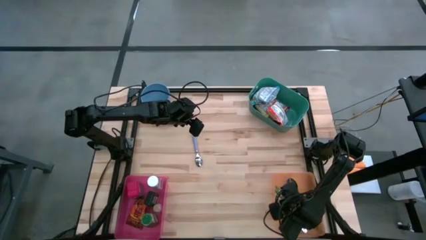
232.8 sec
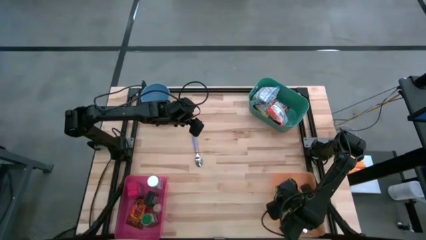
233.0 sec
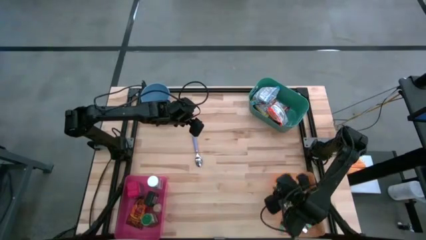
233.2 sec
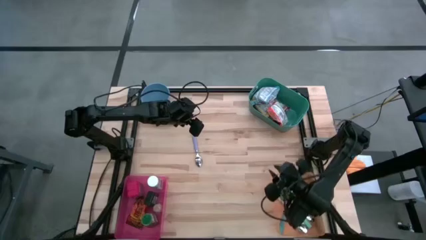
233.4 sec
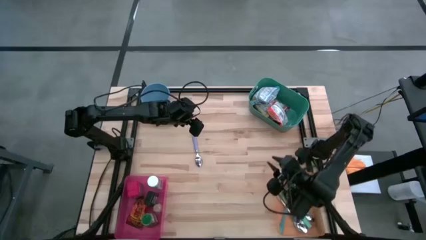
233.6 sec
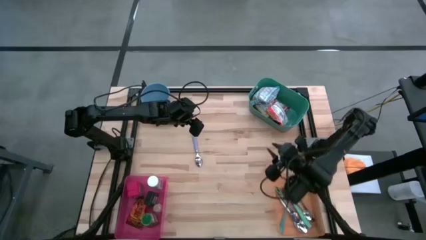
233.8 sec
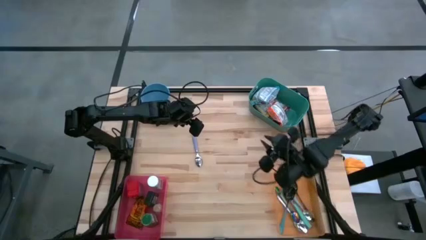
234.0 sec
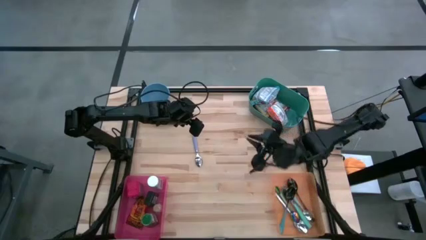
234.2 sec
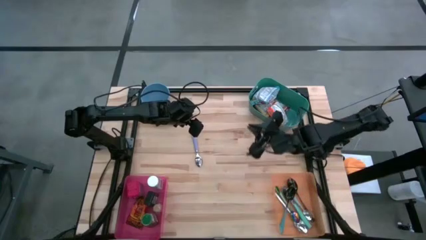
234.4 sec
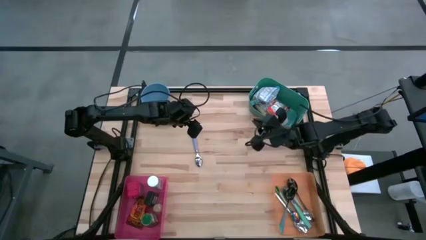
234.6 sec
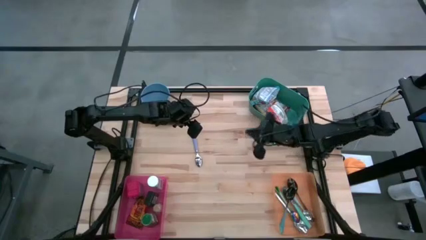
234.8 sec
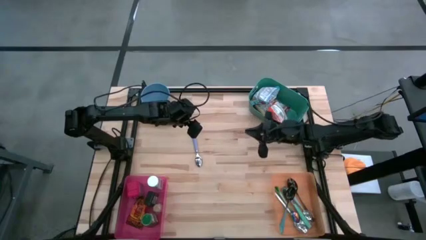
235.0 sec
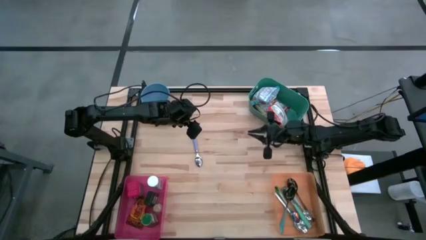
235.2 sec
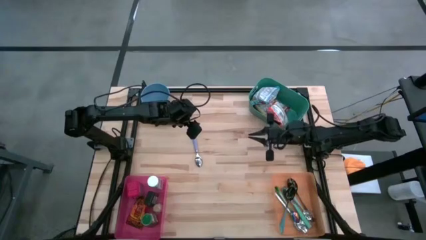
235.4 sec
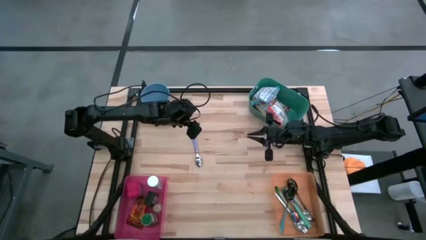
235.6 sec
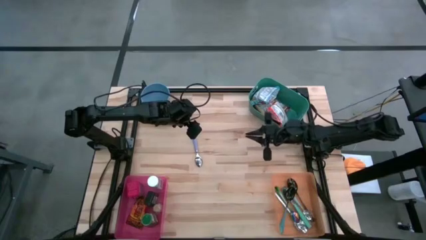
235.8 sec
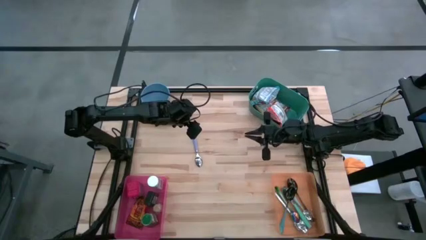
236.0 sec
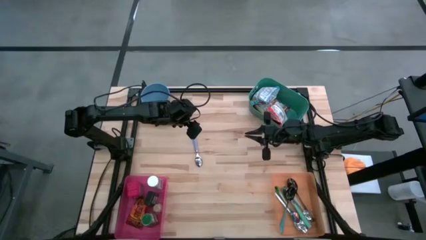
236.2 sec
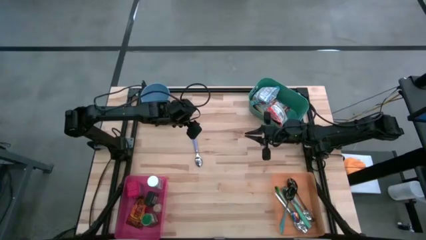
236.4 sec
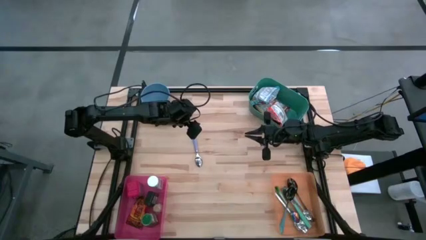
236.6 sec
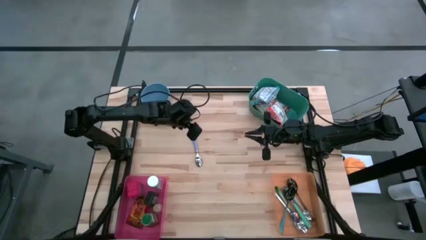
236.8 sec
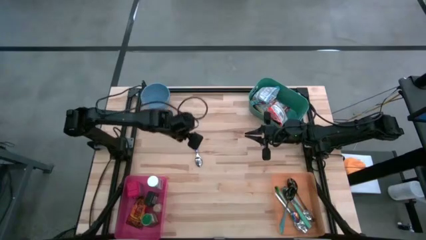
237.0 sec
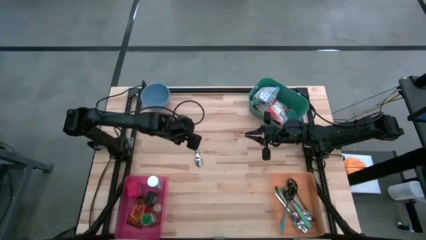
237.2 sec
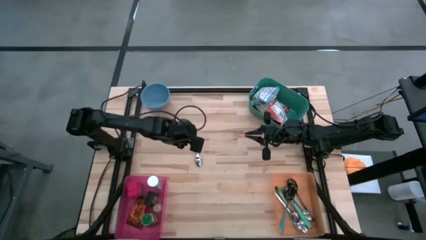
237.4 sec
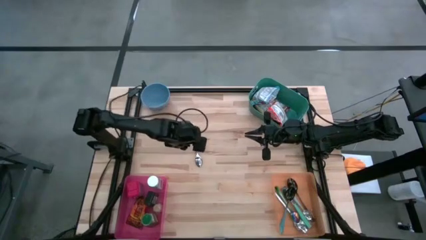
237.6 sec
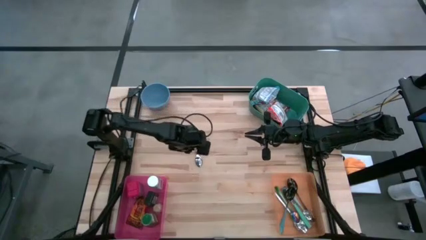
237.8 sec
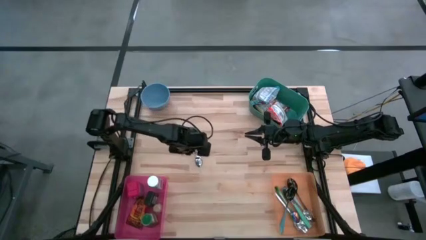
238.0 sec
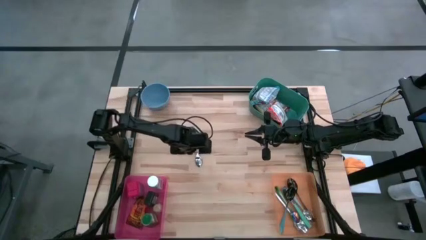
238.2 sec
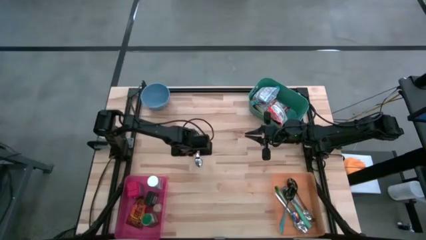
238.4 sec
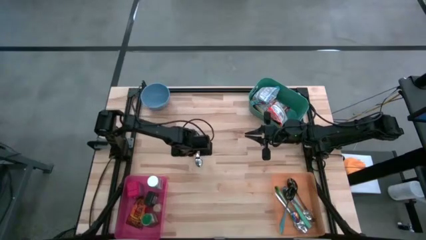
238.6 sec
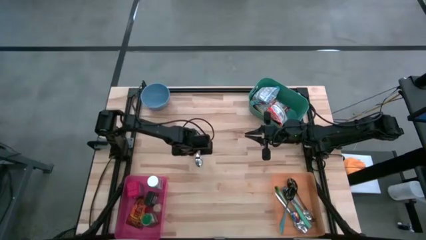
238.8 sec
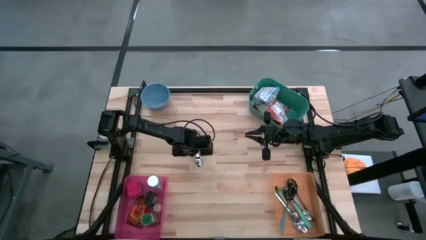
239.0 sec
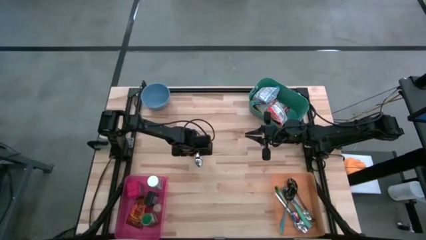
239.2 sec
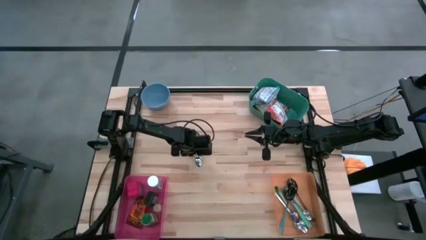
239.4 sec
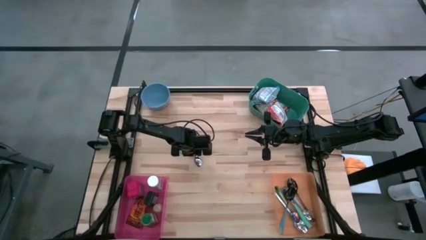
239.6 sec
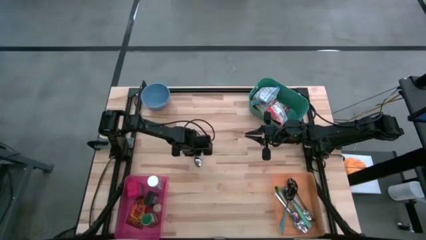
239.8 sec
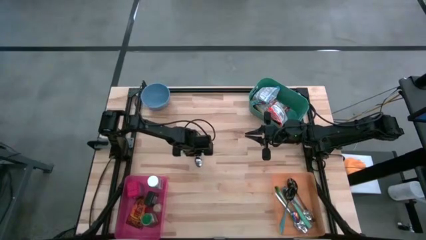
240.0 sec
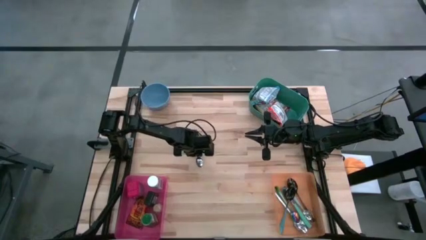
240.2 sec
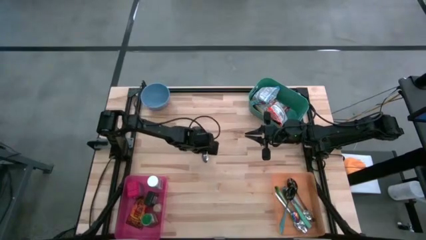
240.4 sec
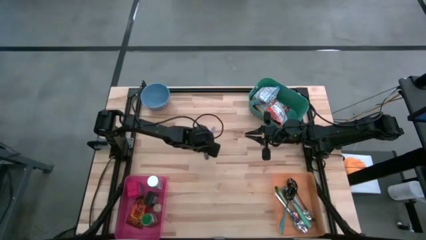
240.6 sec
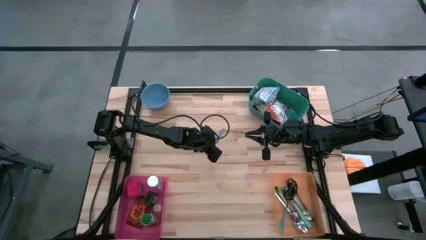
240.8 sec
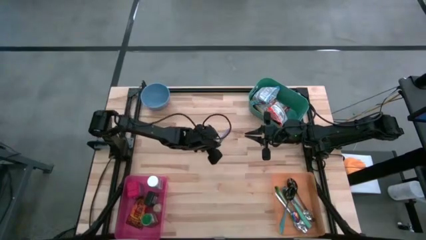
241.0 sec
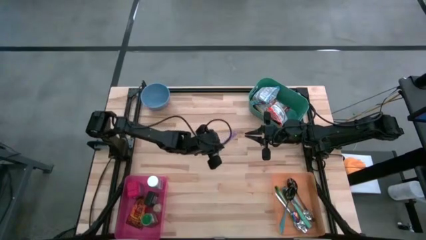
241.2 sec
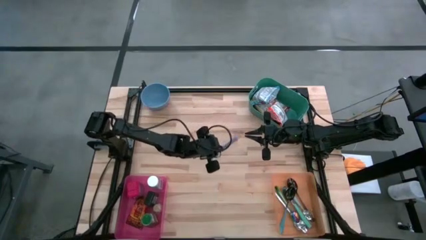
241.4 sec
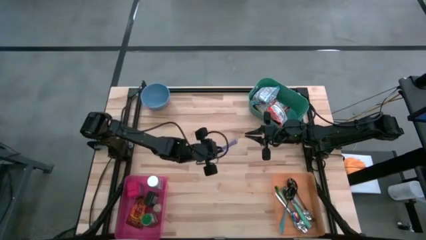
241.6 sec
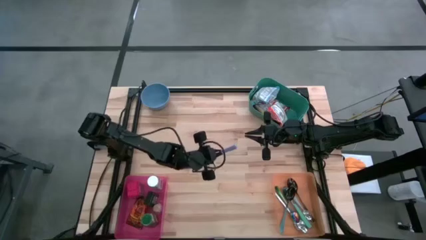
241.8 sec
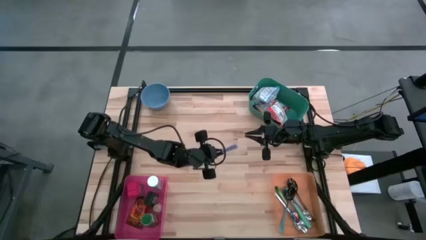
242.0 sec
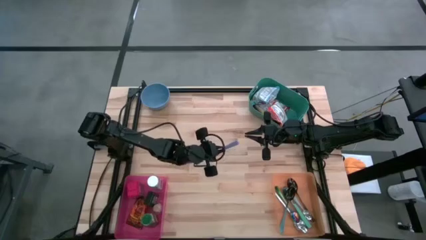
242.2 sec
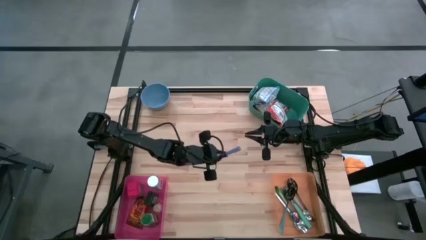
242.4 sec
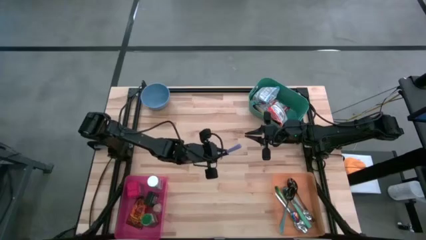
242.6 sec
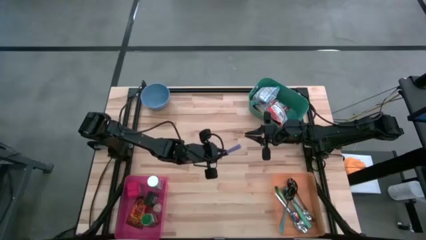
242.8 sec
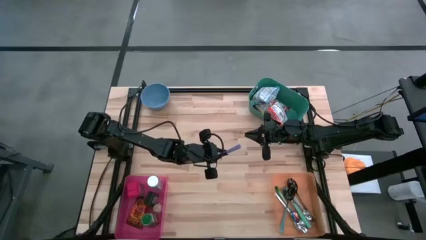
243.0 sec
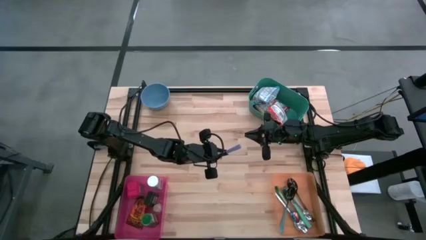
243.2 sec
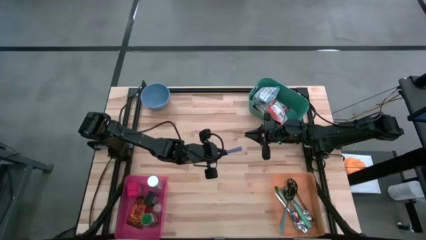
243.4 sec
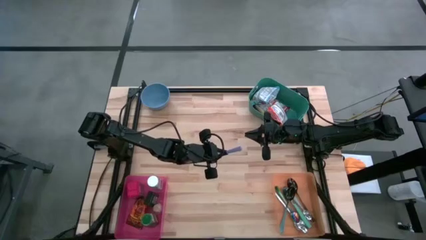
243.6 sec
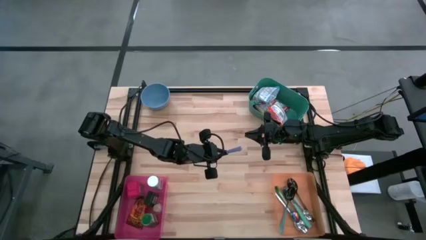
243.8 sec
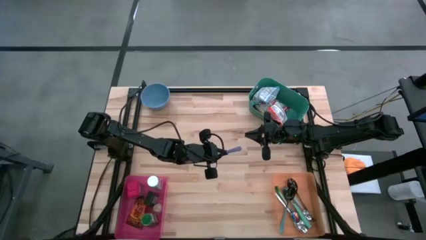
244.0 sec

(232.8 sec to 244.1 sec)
Put the purple spoon into the orange bin

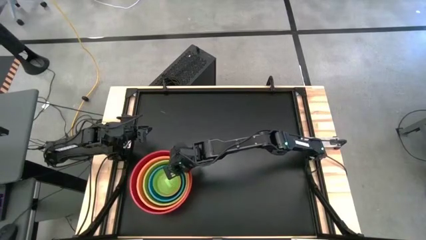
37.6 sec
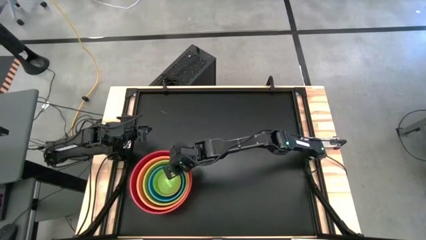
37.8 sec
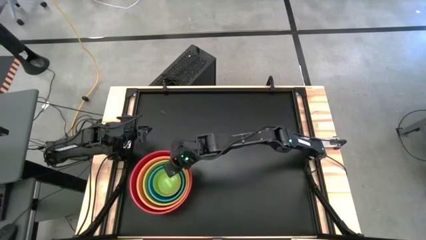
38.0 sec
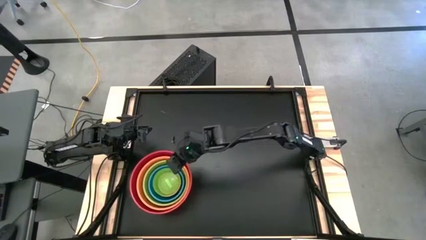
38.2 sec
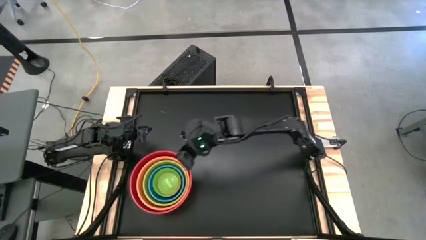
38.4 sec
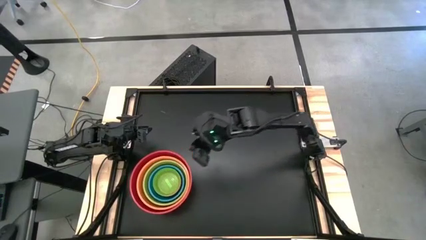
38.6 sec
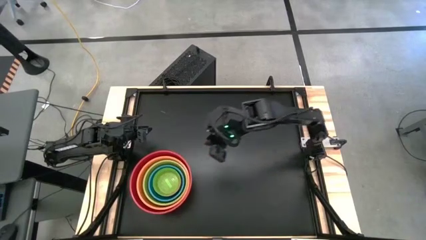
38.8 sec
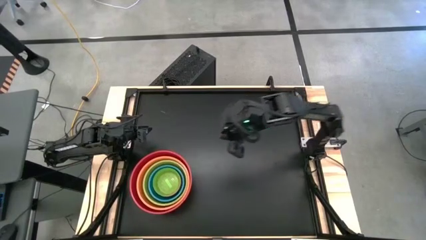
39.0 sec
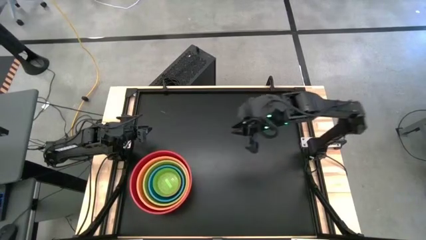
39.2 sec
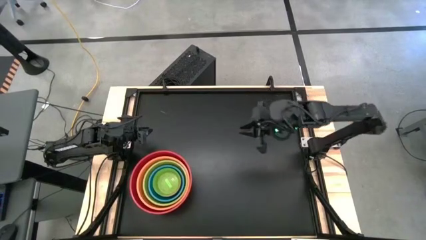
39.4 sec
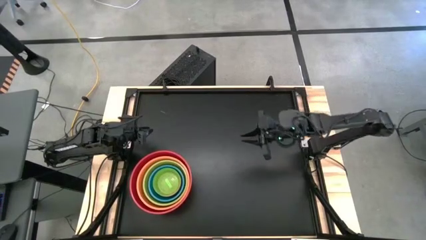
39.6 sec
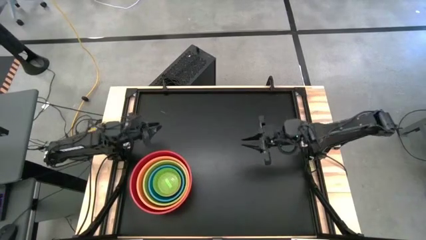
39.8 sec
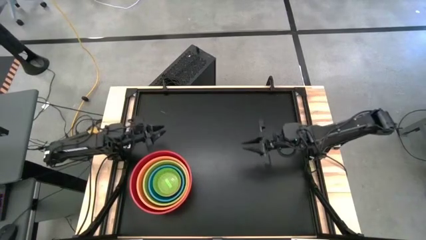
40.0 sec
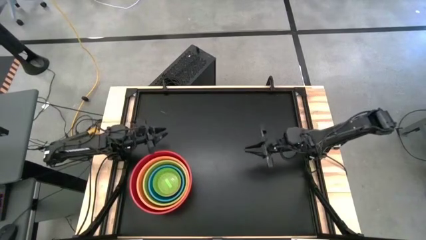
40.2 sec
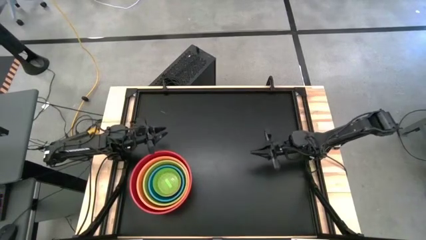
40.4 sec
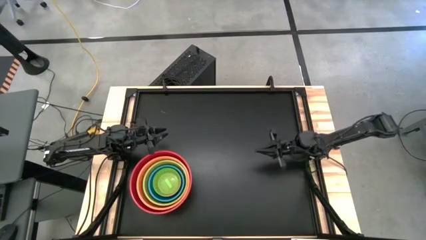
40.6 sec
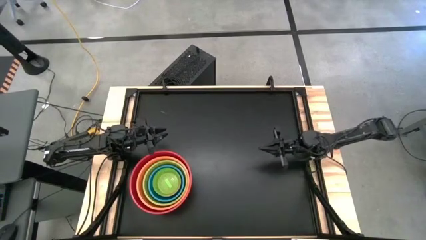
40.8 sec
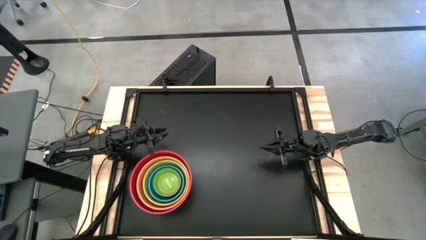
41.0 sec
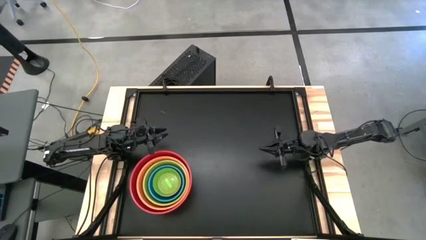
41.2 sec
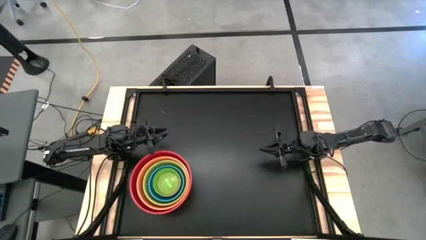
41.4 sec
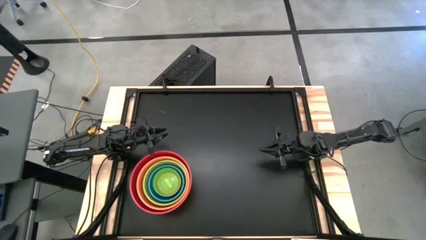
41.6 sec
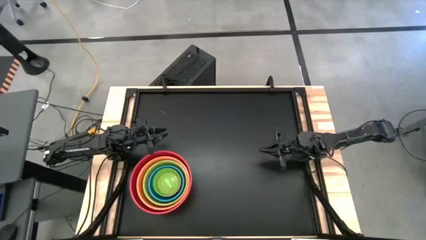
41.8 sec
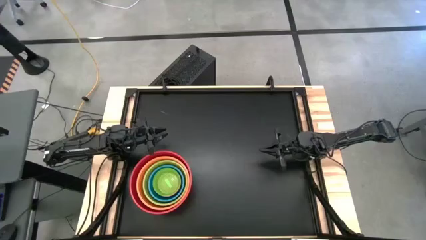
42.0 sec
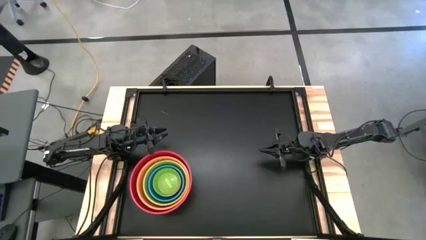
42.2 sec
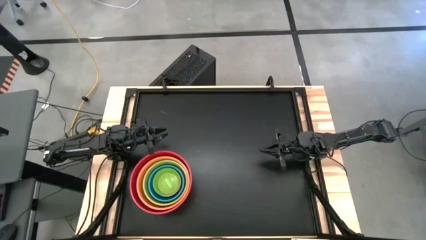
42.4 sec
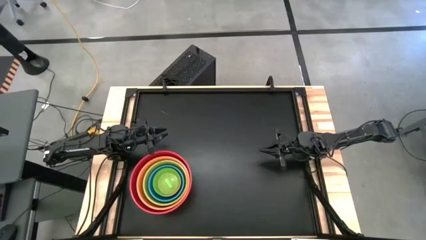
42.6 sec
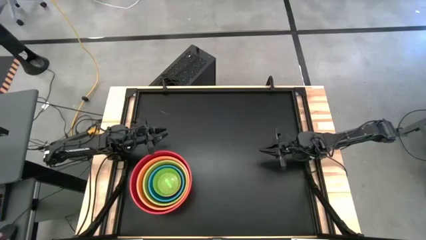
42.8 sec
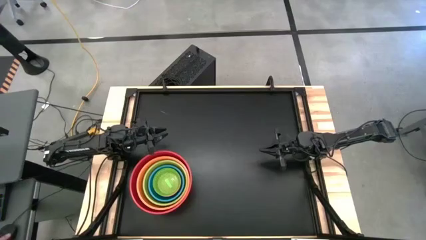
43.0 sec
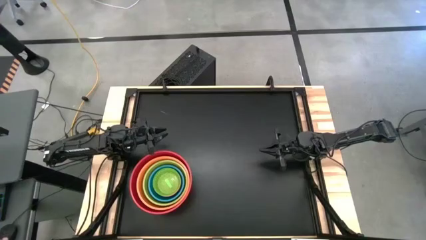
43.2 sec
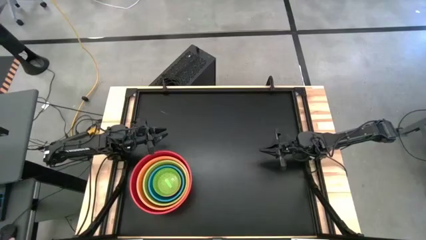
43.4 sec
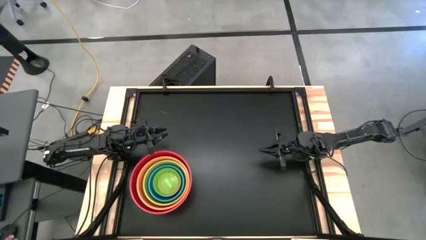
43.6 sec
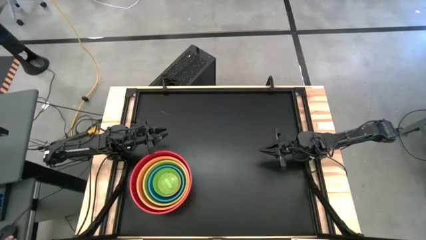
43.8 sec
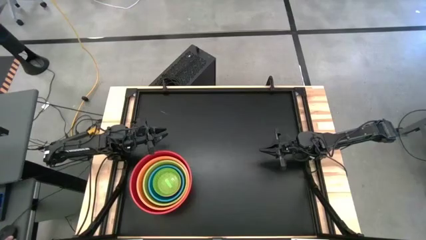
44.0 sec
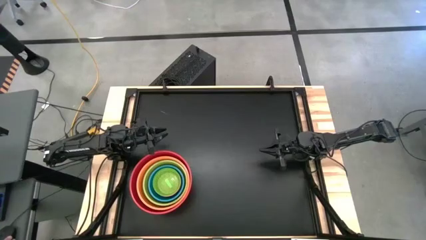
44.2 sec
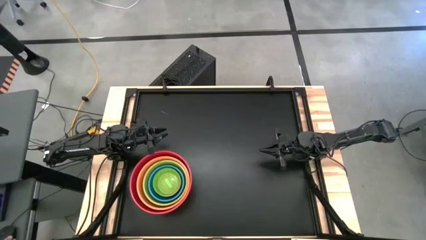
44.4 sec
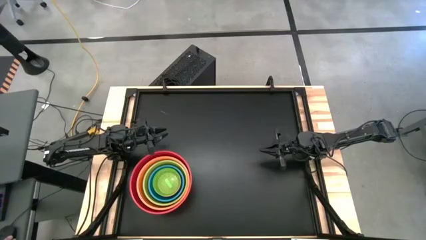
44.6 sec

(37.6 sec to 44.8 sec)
Return to Home Position
